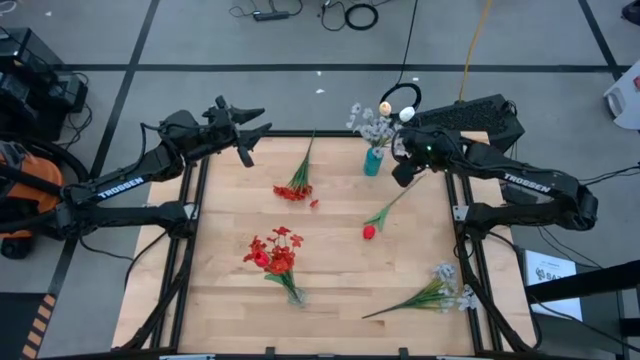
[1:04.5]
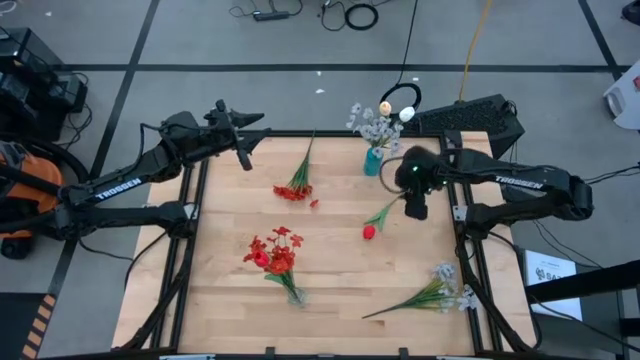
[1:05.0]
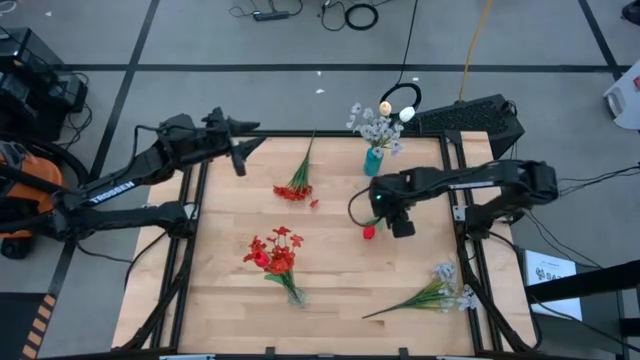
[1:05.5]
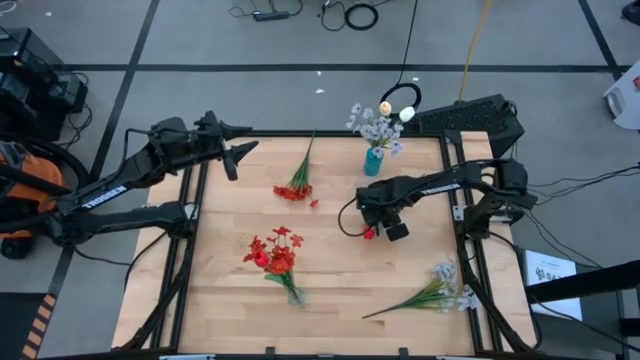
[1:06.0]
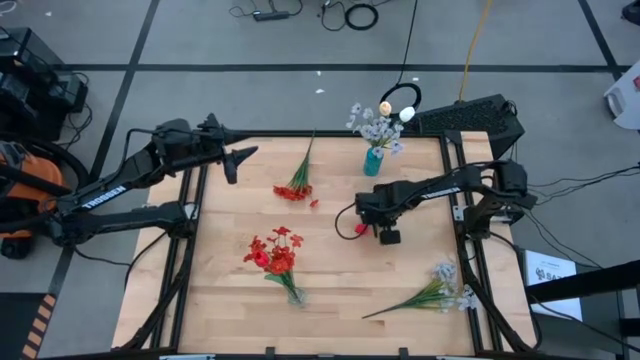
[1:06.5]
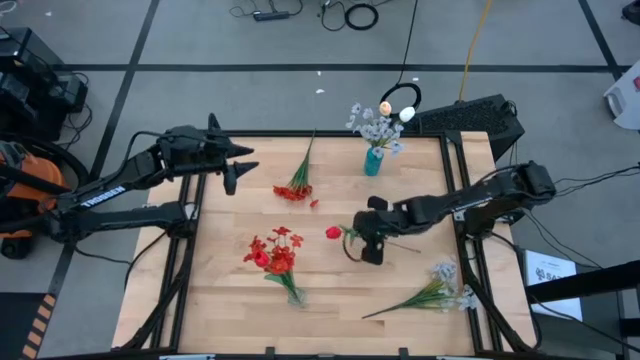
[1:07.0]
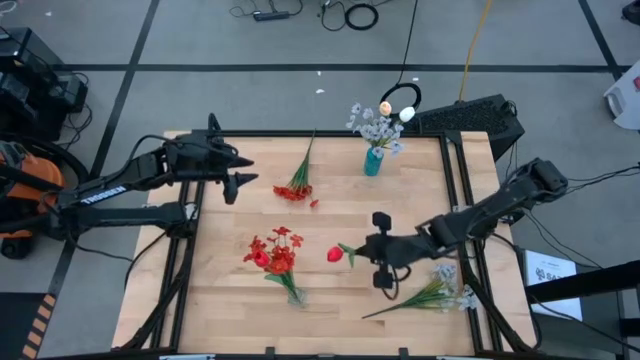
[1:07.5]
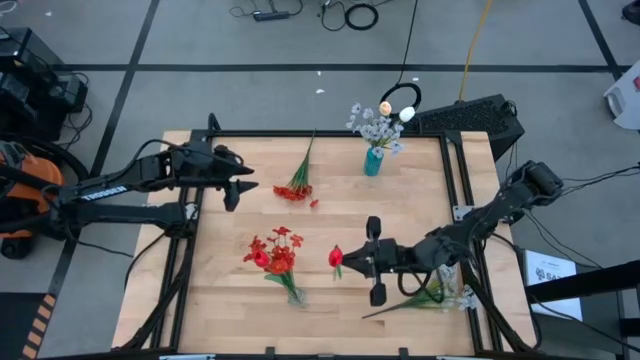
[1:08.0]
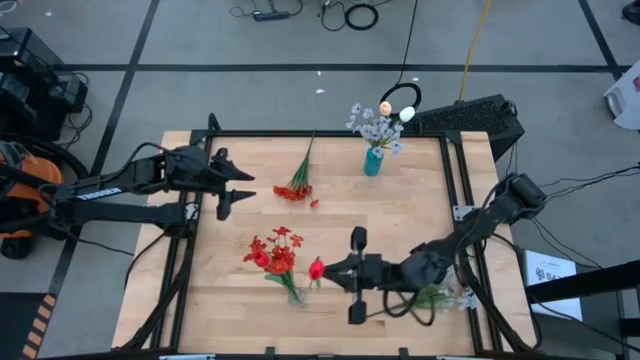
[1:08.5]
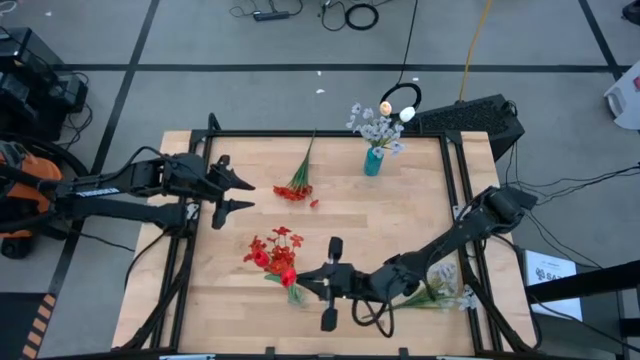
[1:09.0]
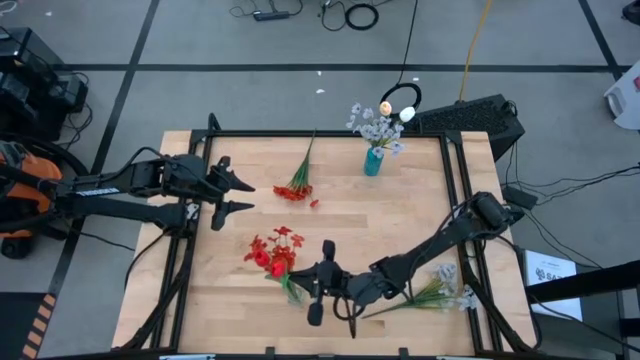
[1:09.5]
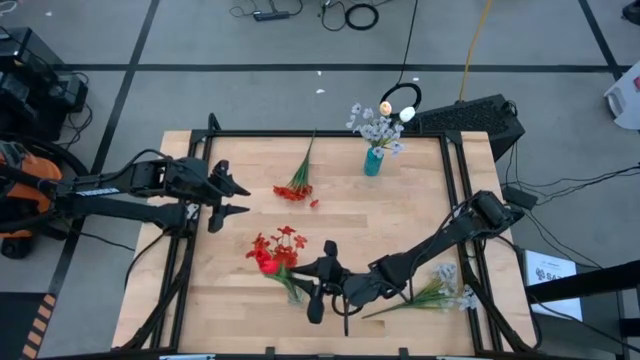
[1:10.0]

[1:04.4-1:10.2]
Task: Sort flowers into vase by color
Put the red flower into the transparent vase

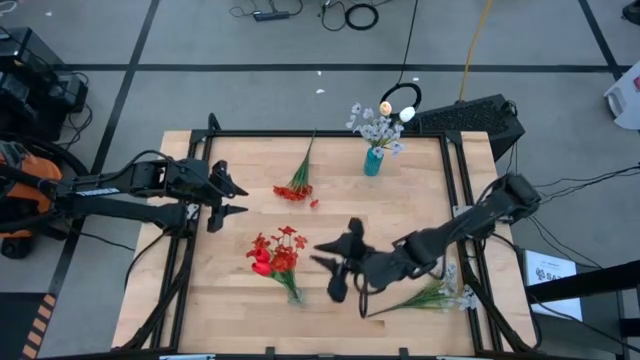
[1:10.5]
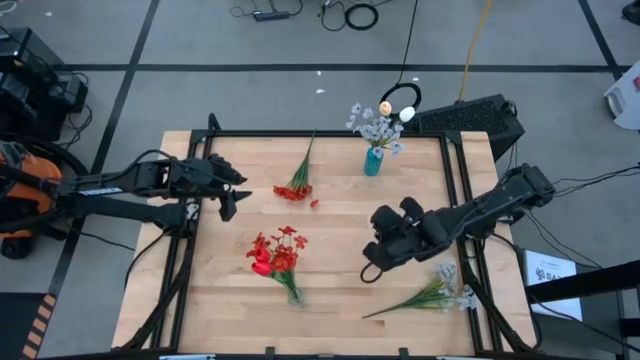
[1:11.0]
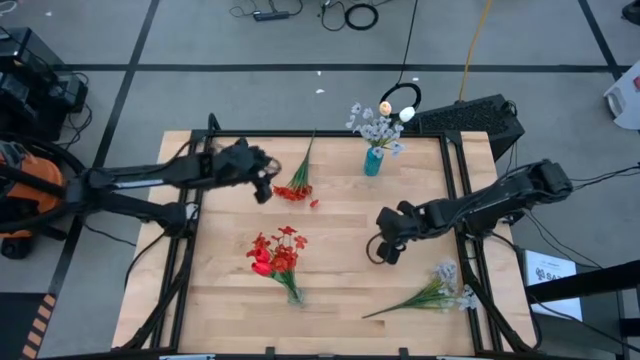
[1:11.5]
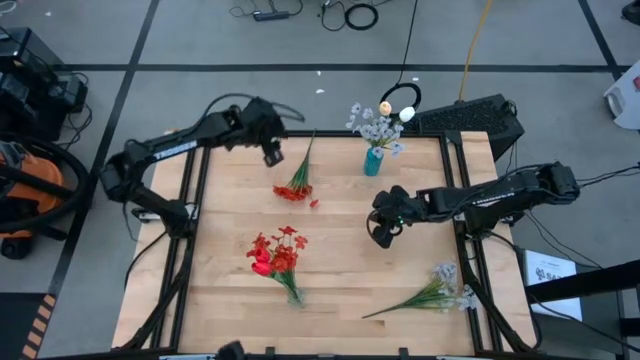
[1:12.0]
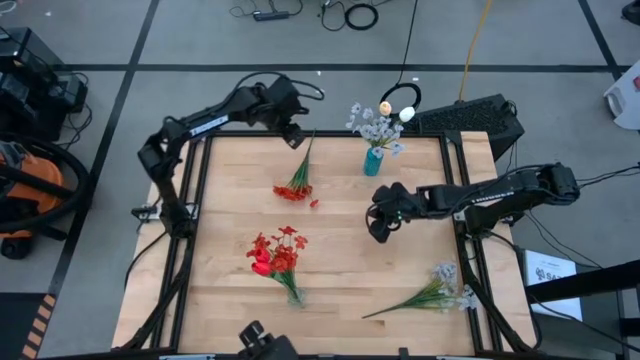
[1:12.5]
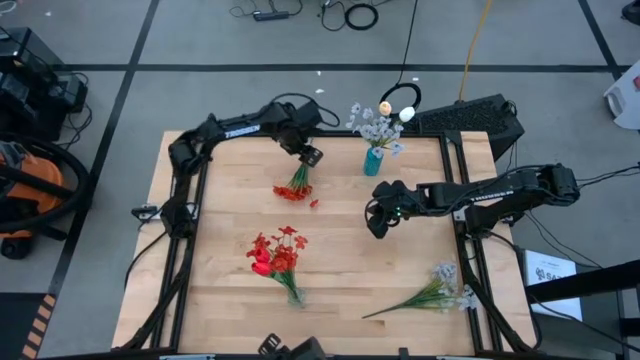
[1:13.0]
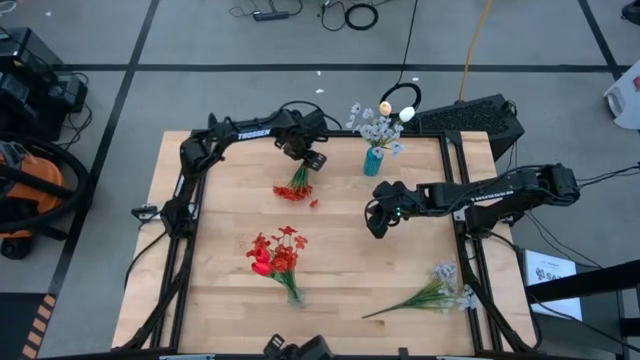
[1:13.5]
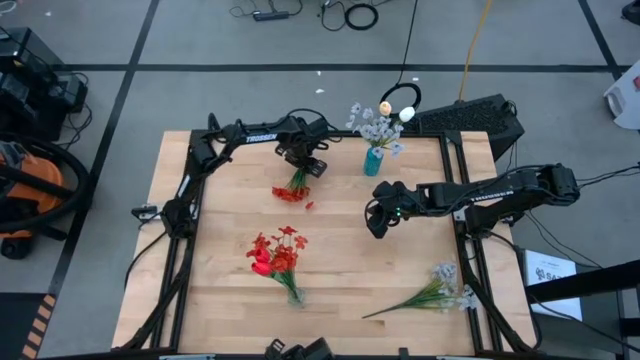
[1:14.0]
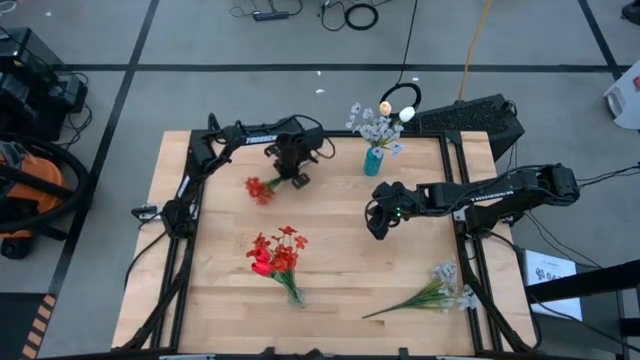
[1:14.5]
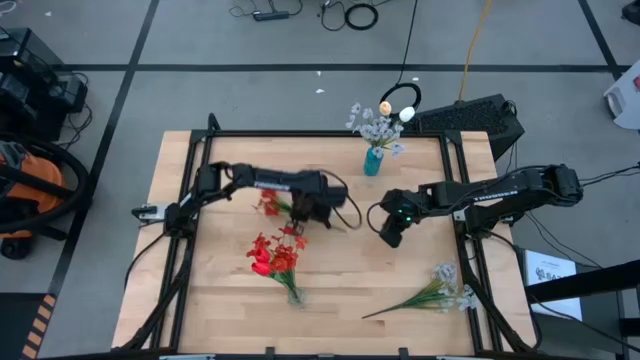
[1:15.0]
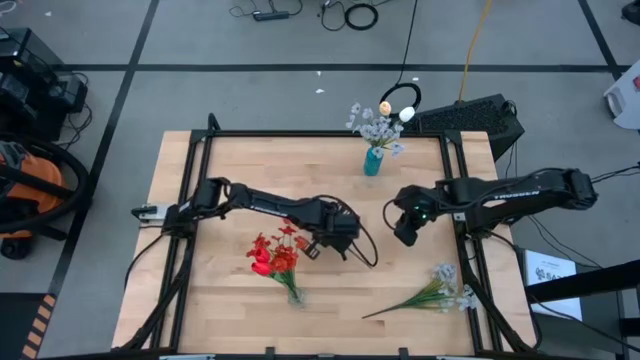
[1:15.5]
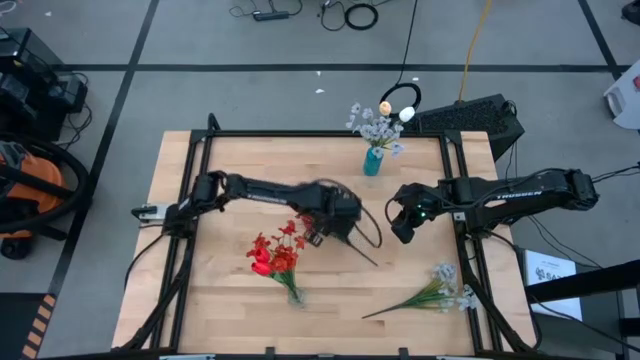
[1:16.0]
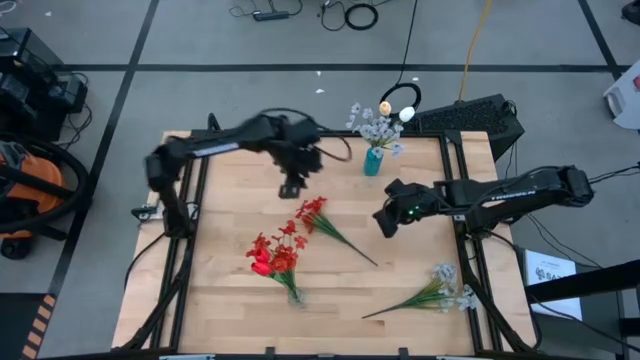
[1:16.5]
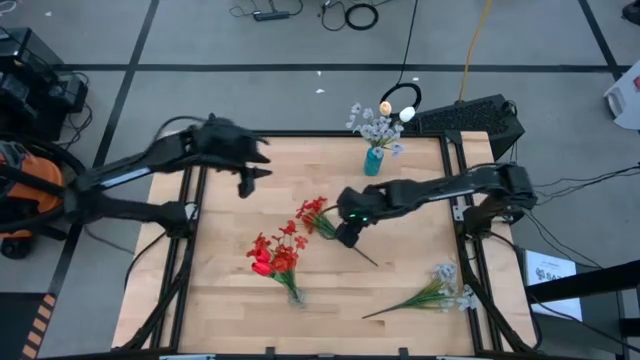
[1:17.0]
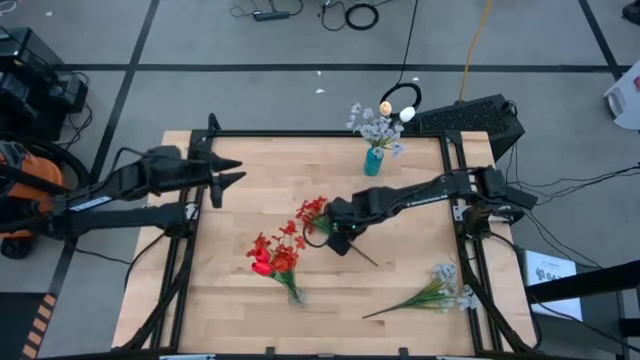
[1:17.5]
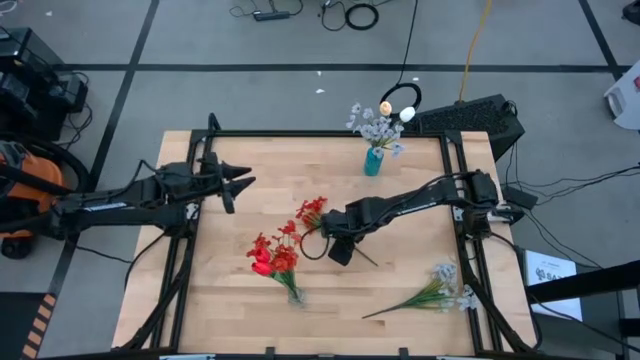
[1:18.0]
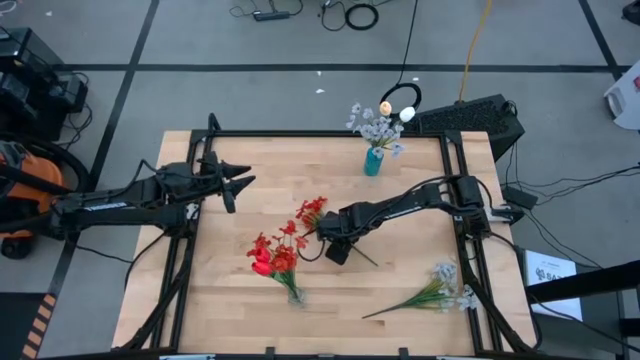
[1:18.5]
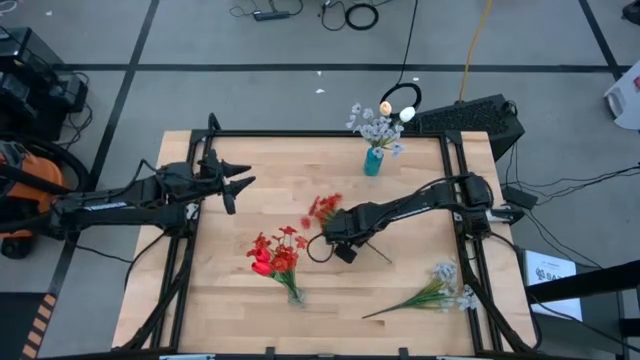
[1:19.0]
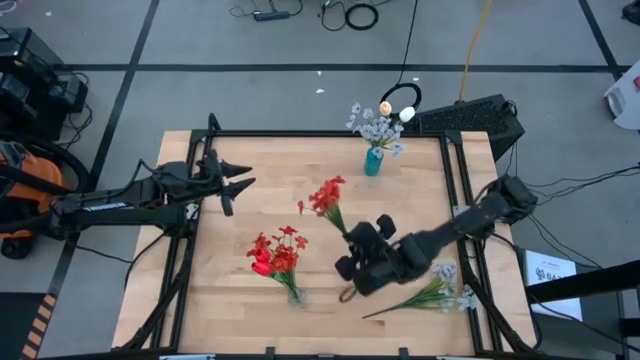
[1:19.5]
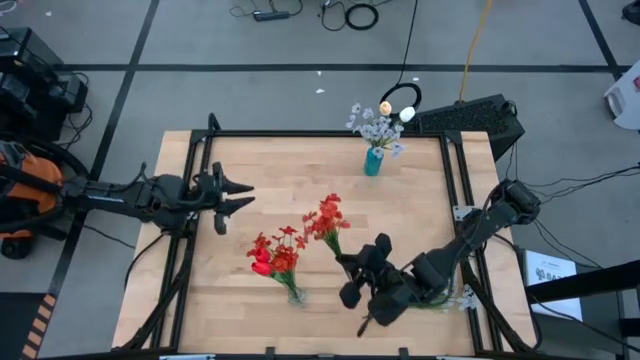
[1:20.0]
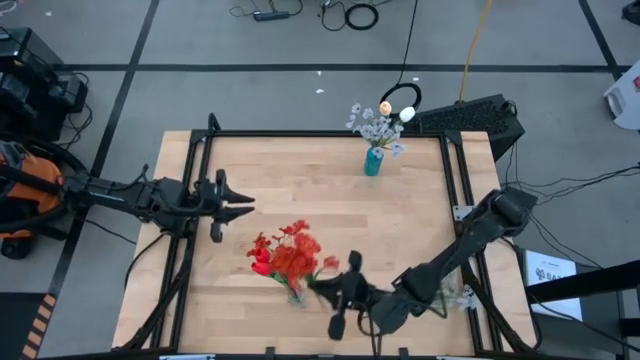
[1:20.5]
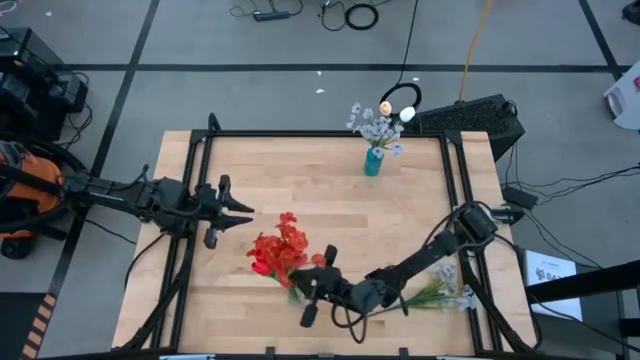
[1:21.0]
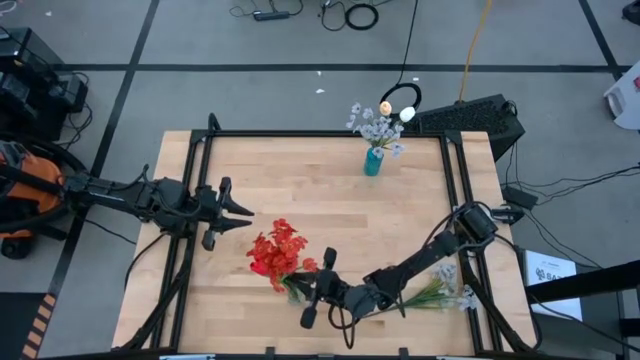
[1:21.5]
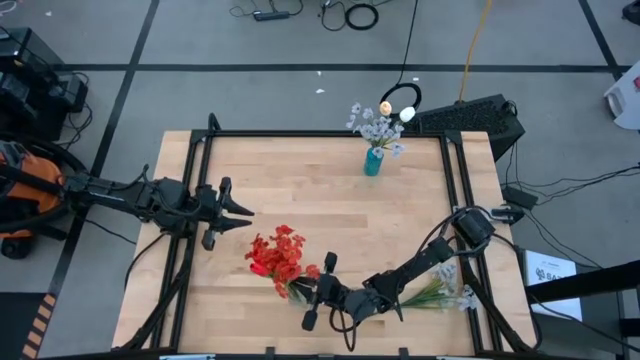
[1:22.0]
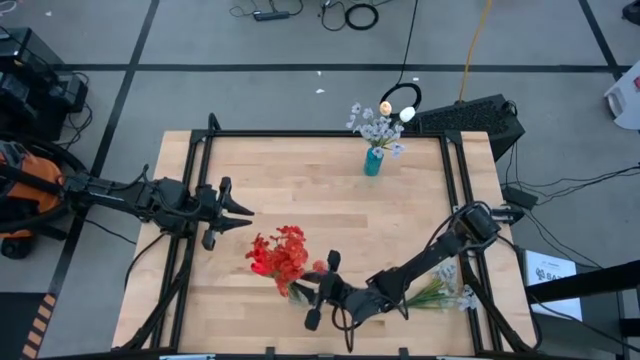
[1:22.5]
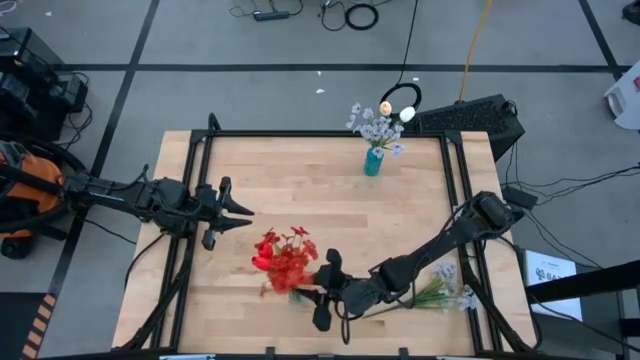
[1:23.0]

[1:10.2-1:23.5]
Put the orange flowers into the transparent bin

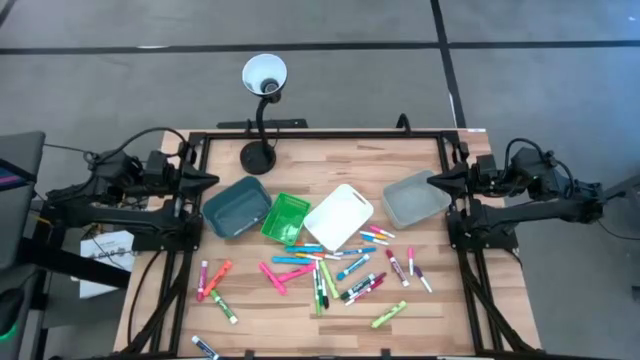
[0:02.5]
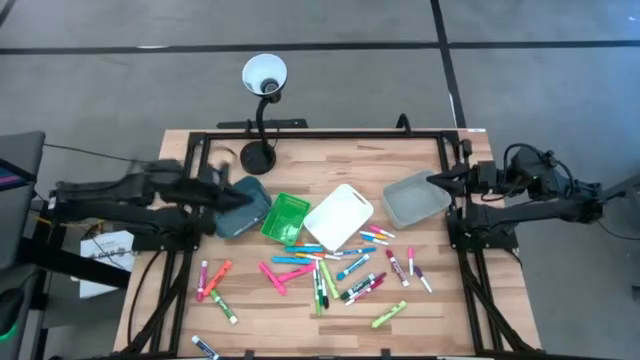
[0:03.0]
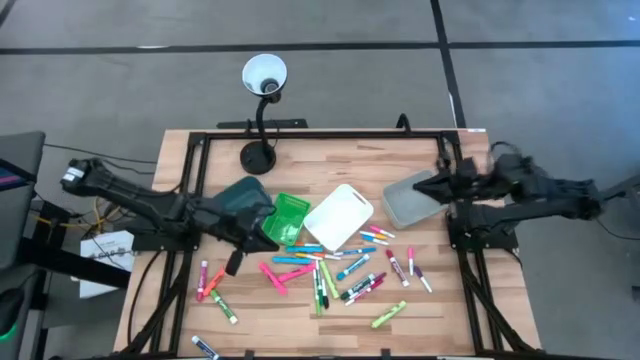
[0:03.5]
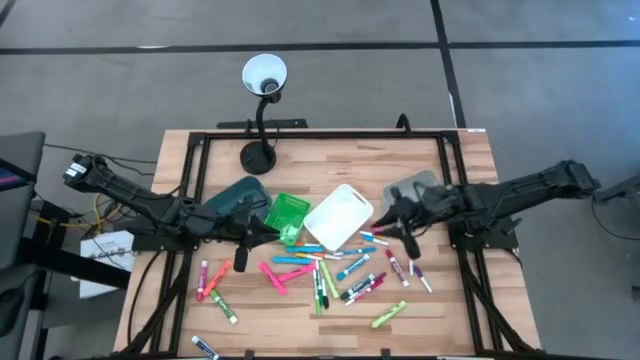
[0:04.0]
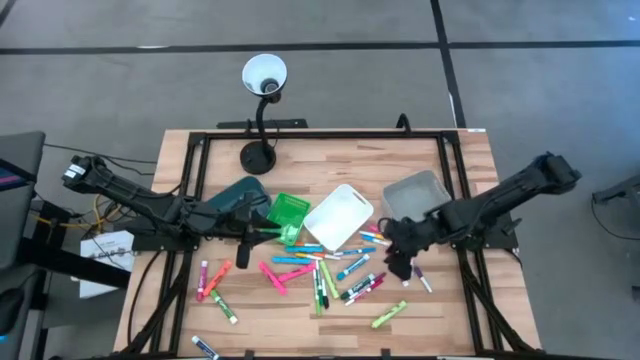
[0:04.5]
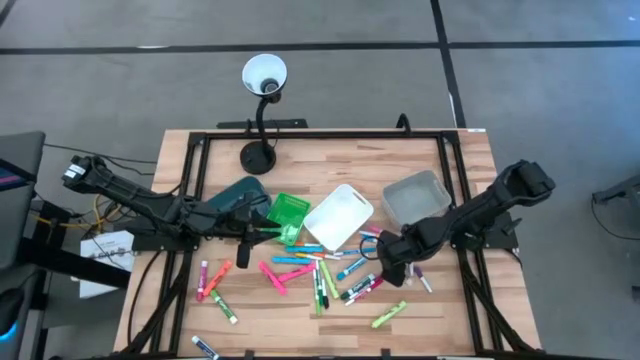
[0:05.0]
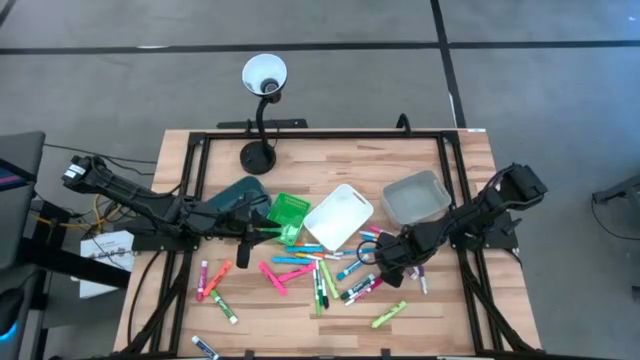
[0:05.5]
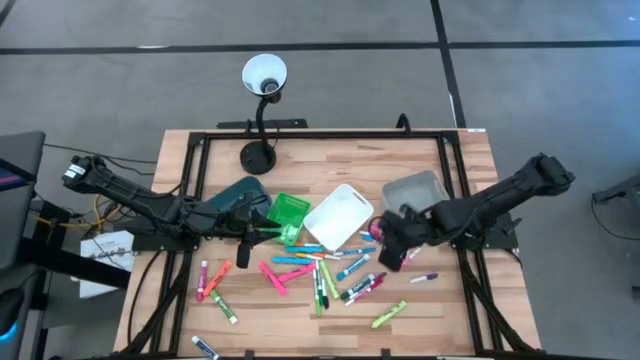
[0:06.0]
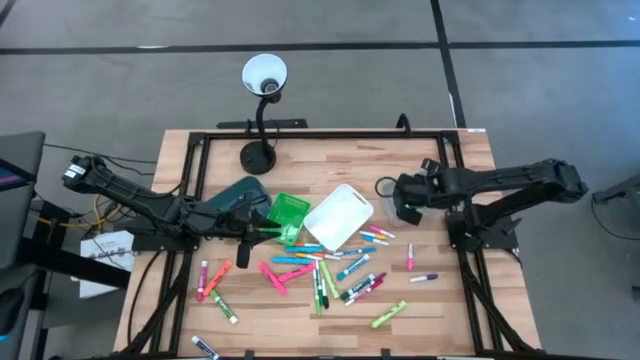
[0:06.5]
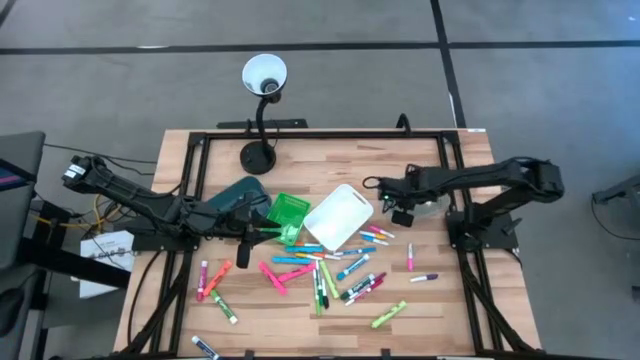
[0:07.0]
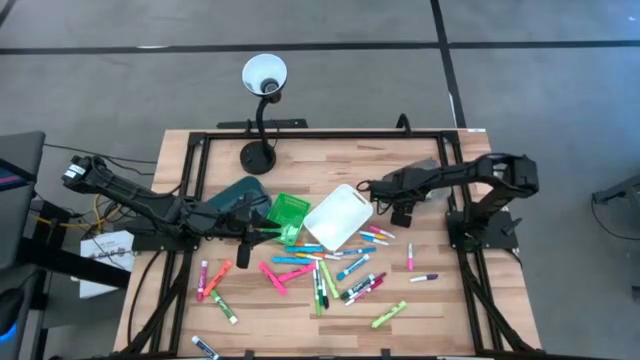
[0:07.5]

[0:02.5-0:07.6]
Task: Pick & Place Markers
Put the red marker pen into the gray bin
